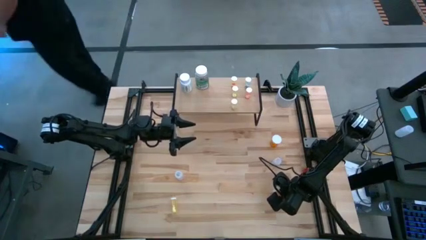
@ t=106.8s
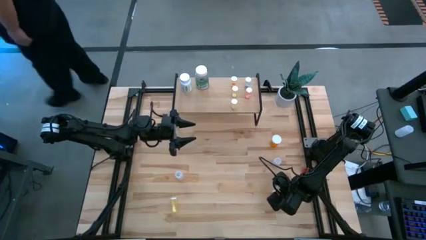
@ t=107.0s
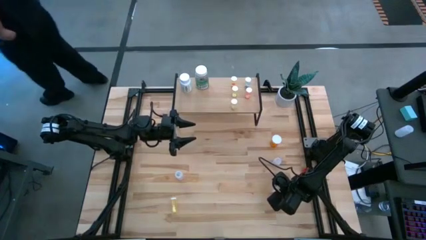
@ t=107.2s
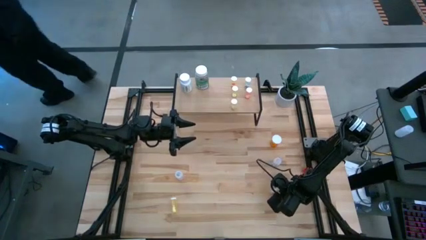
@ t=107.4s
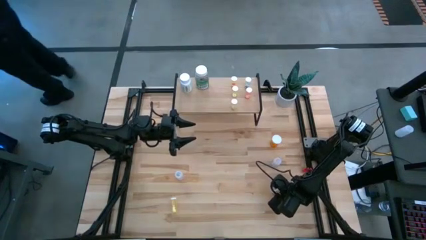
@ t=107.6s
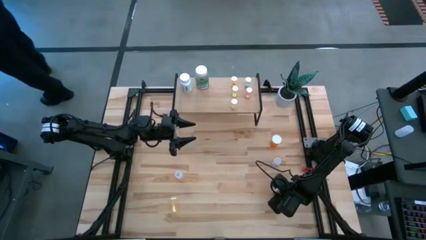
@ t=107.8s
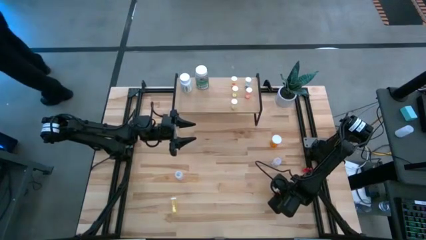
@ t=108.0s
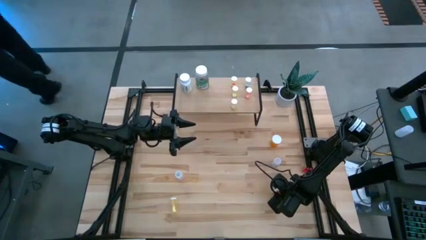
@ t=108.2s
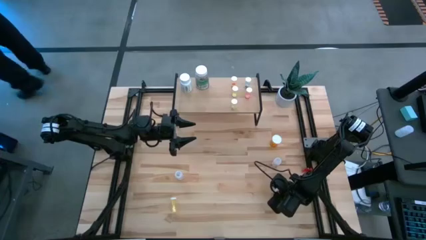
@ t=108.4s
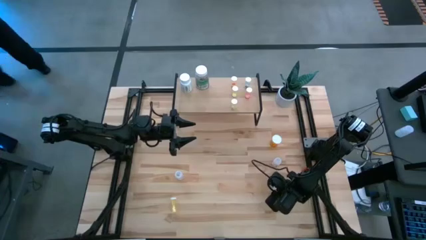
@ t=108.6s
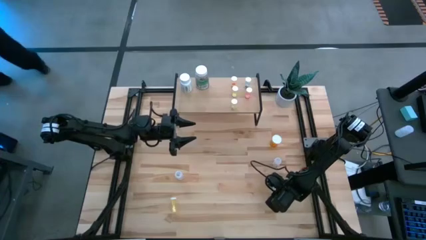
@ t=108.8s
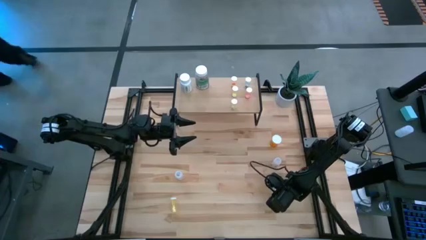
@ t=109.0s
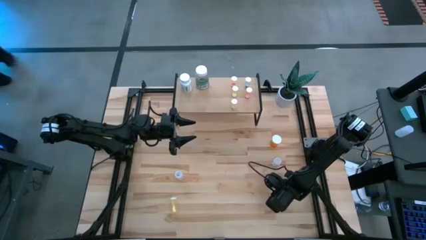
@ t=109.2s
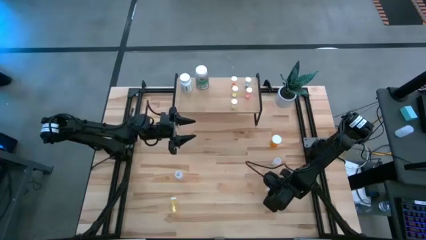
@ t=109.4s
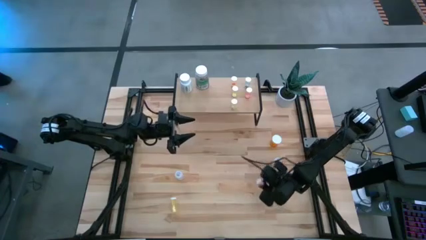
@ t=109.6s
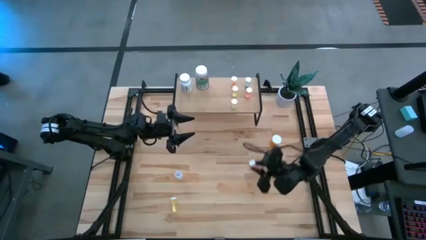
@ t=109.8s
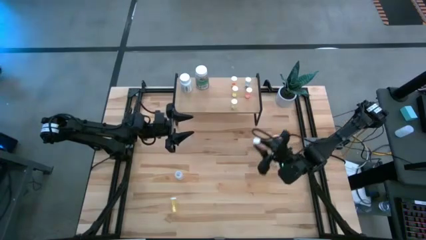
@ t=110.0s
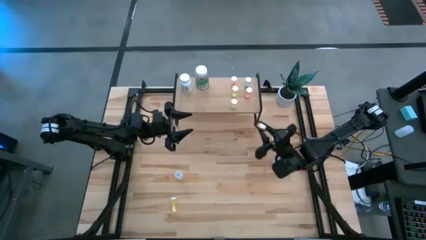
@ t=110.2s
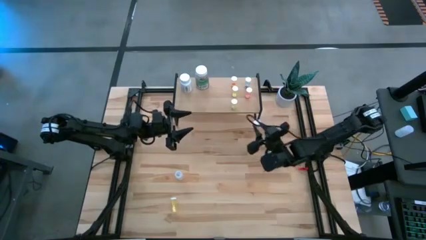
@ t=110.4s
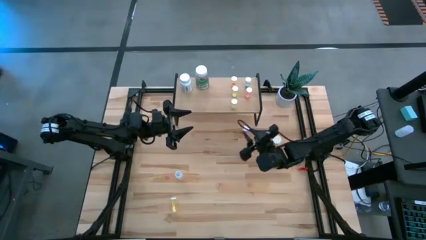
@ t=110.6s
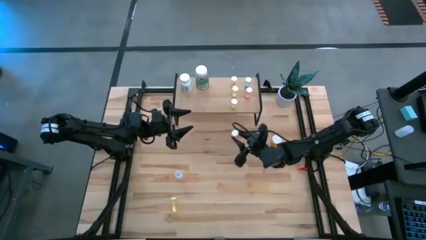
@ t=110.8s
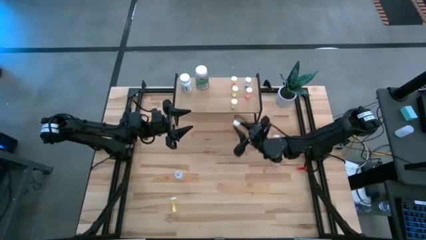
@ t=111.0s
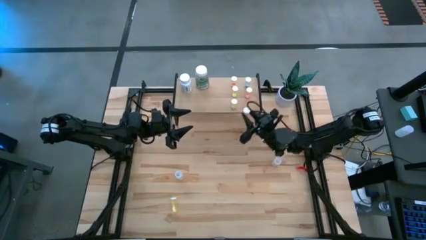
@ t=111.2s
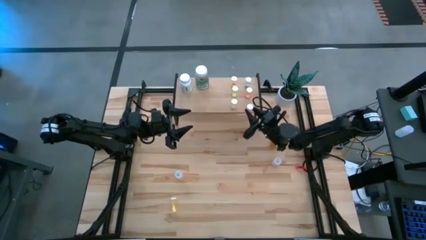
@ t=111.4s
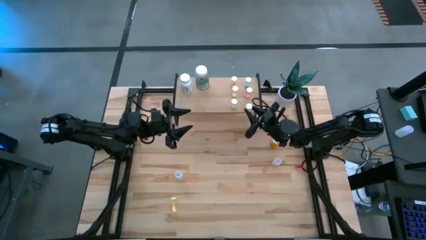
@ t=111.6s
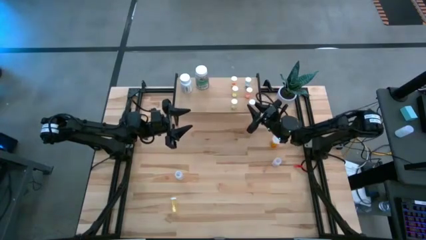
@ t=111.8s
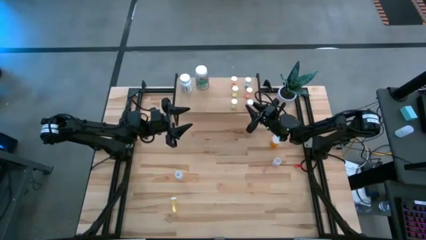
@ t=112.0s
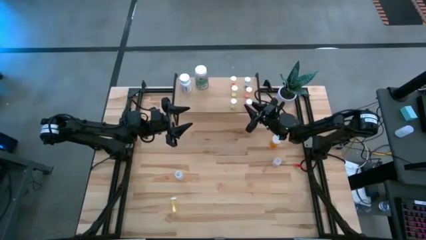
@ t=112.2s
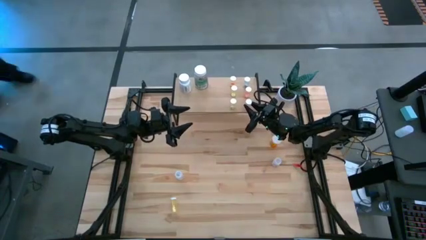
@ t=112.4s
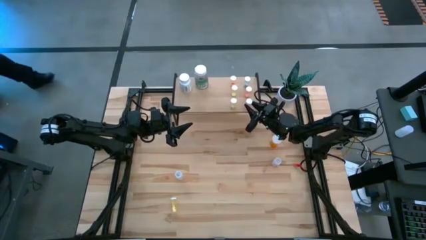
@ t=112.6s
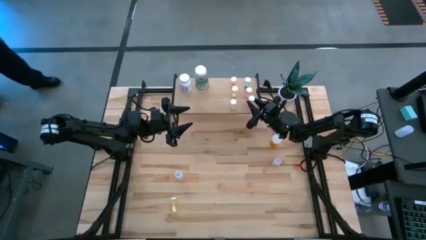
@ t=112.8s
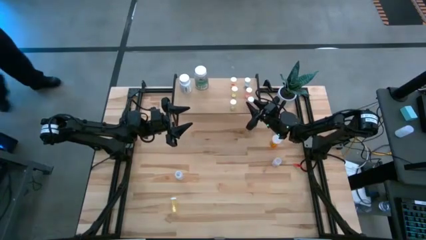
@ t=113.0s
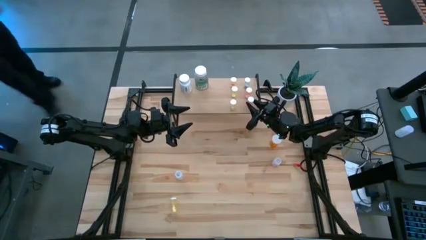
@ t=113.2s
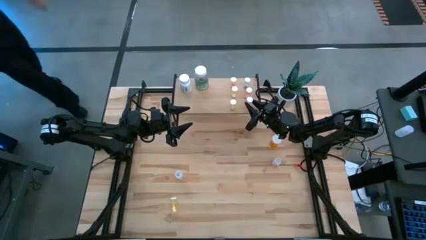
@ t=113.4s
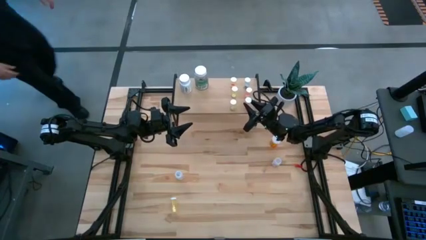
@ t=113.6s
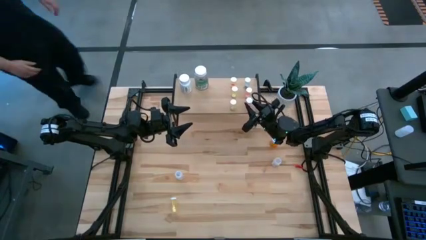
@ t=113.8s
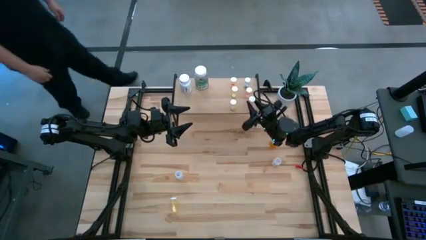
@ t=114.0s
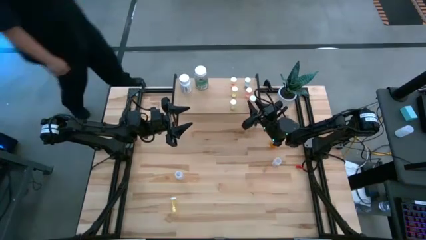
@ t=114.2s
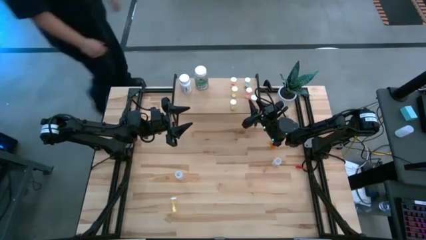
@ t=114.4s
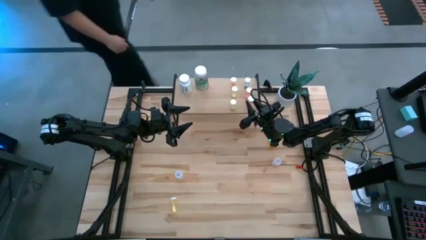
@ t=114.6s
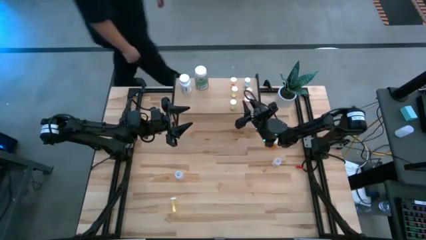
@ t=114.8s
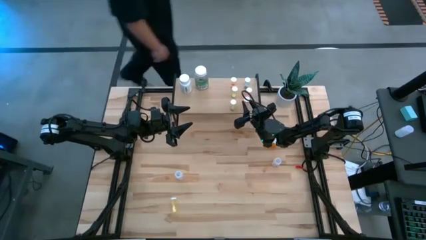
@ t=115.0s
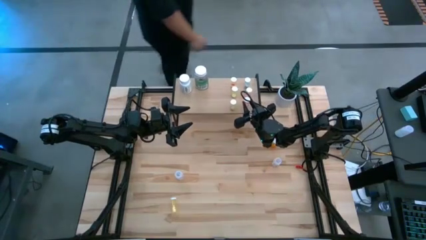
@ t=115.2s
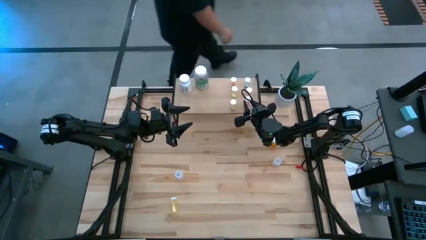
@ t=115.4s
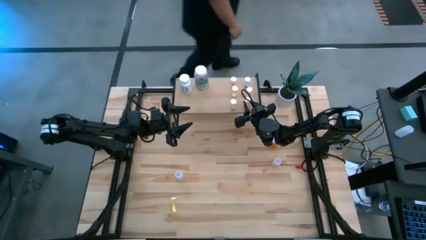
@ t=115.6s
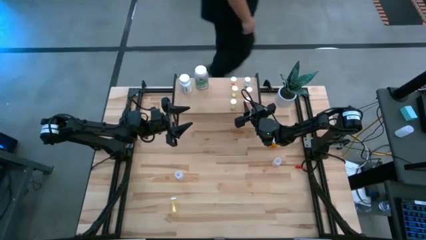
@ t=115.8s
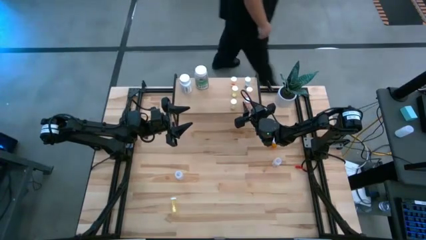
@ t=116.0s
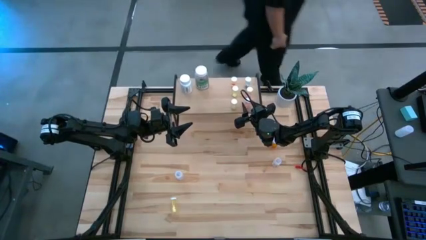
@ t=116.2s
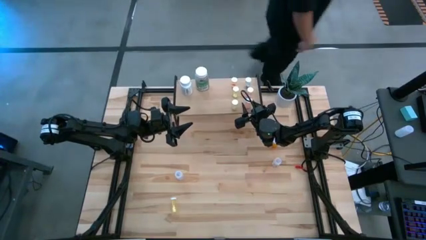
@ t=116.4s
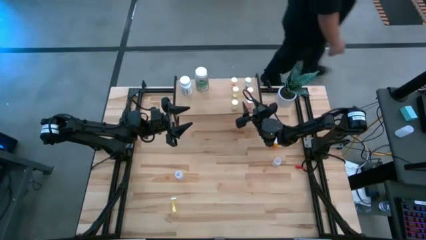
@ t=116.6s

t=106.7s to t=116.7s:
Task: Pick and place medicine bottles onto shelf by color
Put the pink pill bottle on the shelf

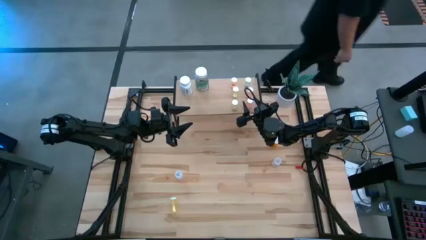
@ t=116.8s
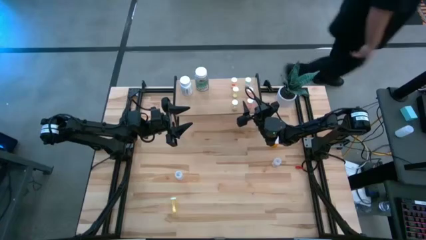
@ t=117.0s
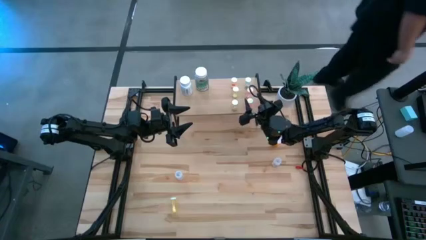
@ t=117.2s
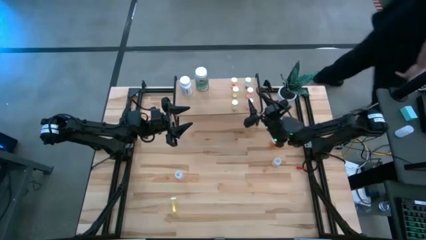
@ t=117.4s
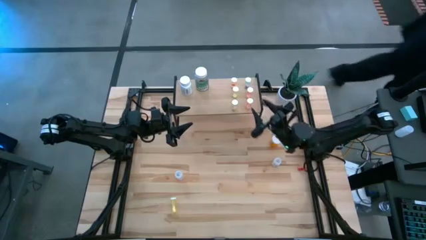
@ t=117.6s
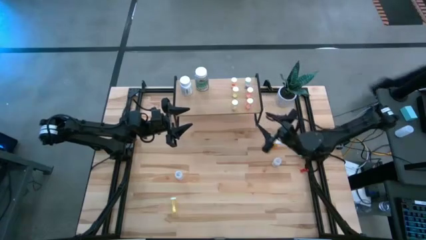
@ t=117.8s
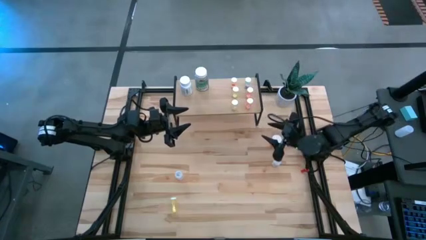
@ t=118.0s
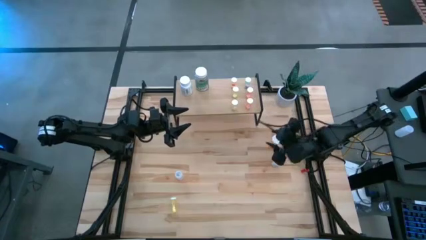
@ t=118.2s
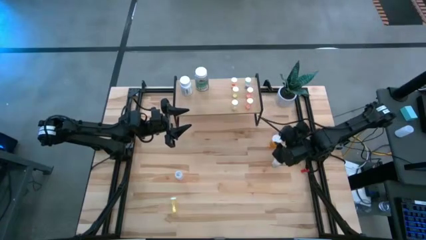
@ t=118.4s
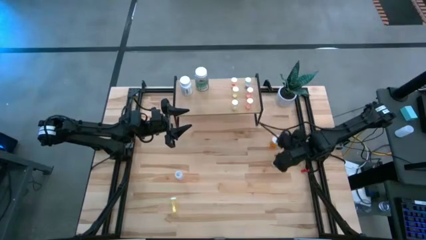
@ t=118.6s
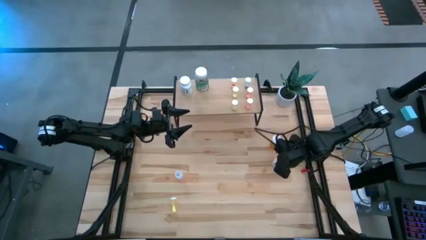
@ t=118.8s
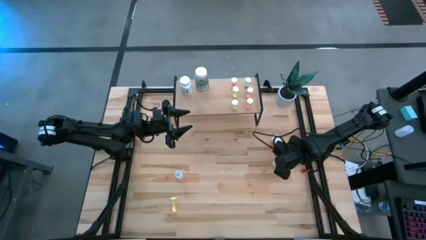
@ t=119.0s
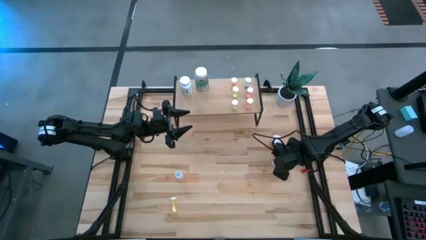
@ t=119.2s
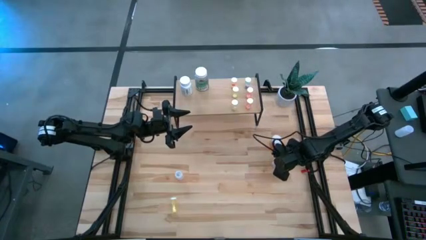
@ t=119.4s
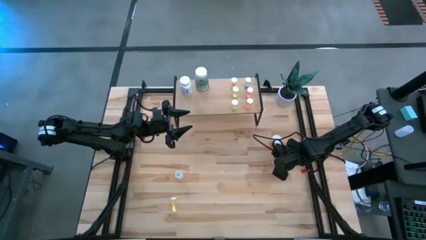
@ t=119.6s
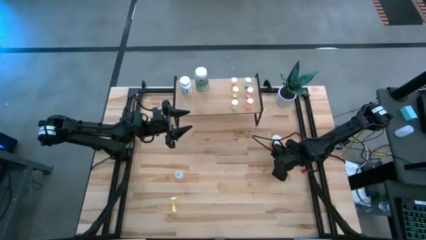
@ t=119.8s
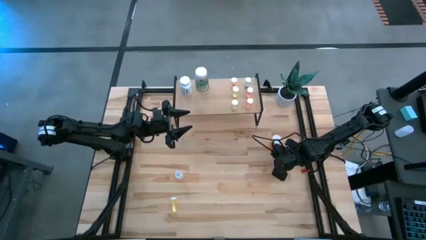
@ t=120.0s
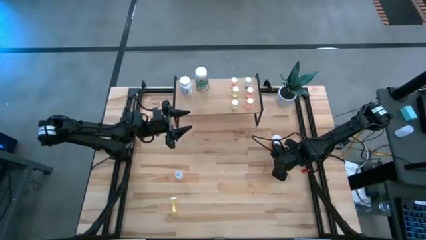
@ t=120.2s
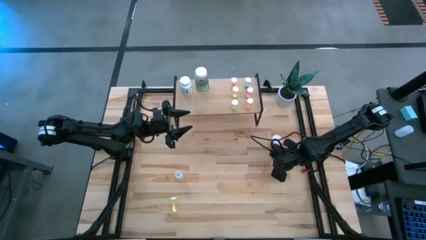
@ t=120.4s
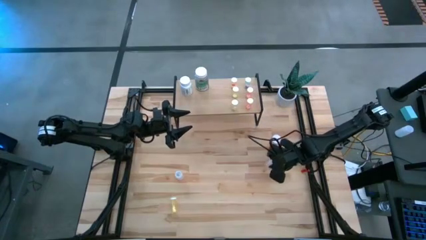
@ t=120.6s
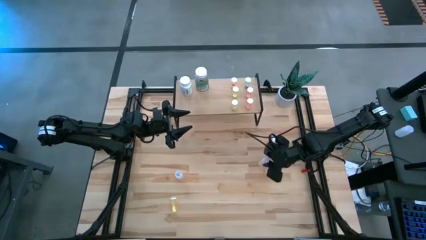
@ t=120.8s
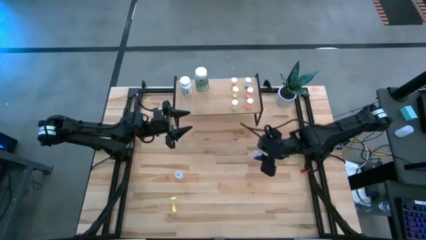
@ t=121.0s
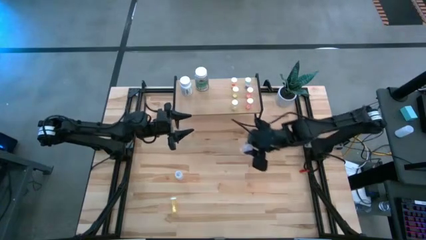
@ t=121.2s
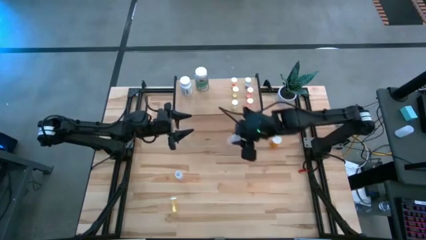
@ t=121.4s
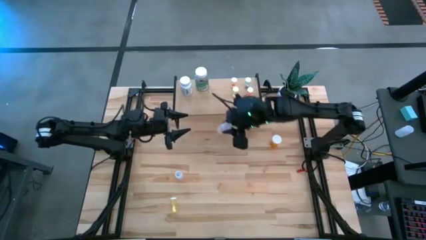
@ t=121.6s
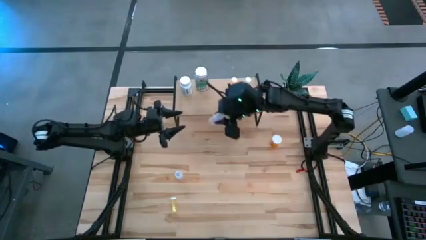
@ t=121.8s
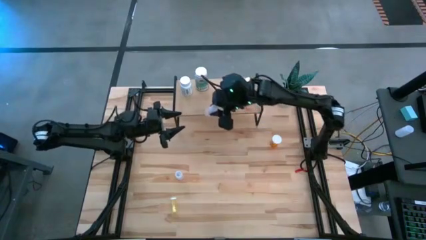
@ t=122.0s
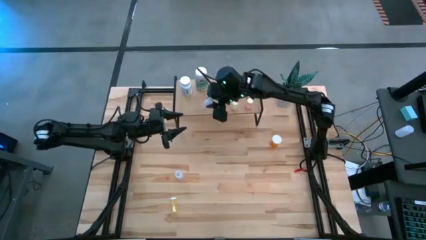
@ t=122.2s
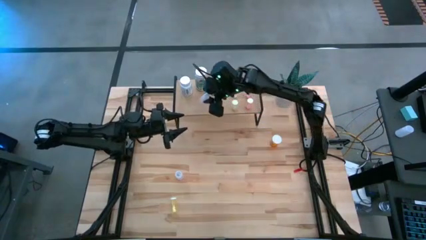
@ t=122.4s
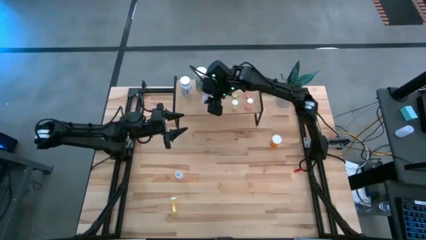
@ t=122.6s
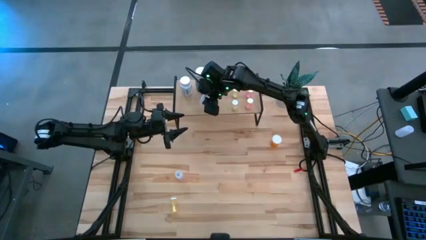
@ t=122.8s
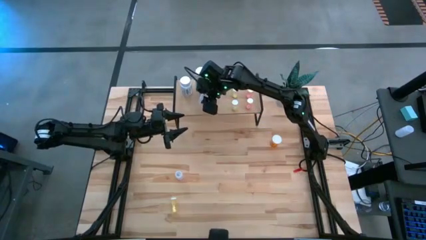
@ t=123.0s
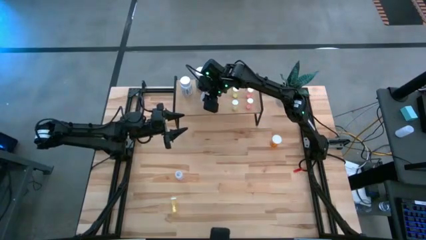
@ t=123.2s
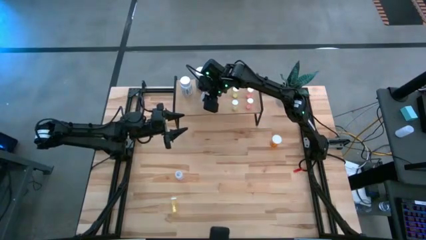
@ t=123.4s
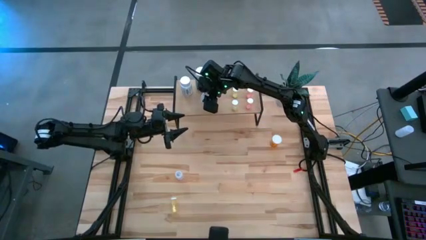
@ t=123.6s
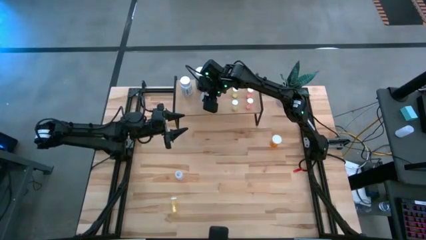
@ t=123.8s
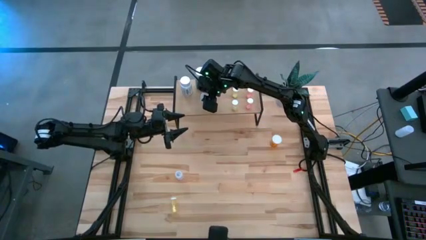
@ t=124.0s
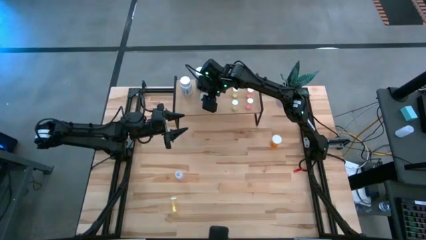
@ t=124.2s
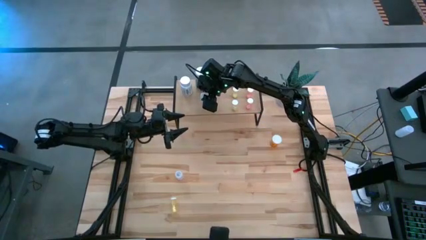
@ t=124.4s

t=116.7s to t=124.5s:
Put the right transparent pill bottle on the shelf
